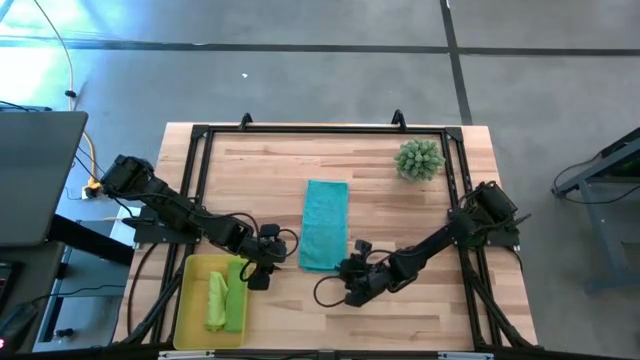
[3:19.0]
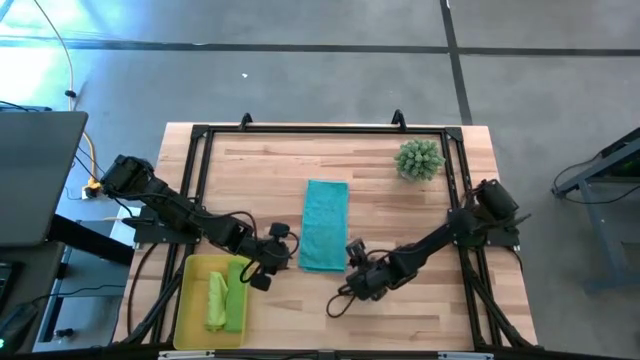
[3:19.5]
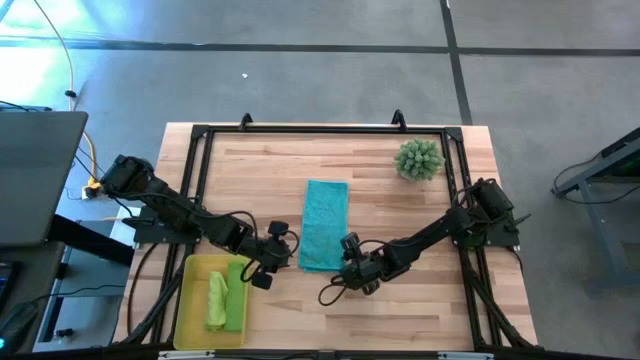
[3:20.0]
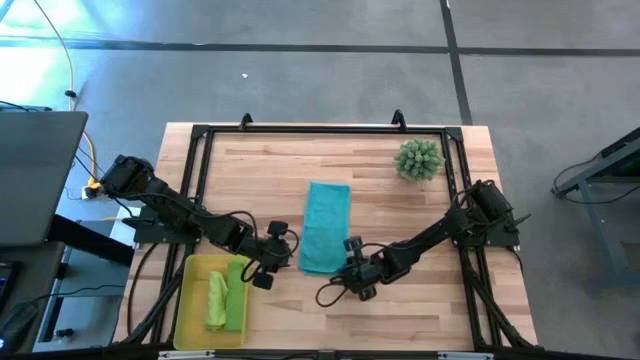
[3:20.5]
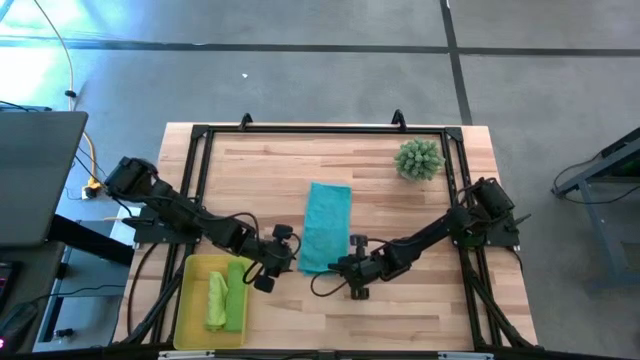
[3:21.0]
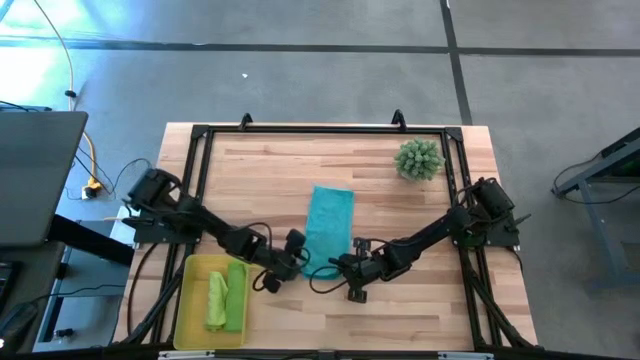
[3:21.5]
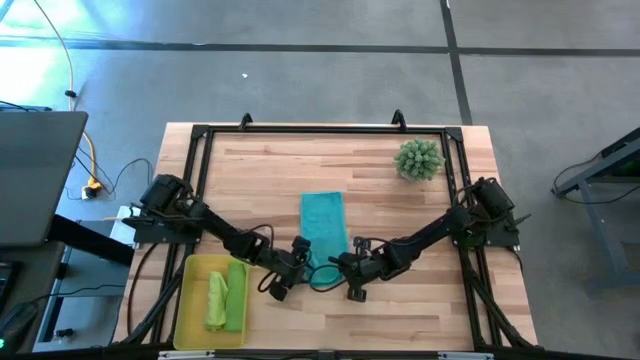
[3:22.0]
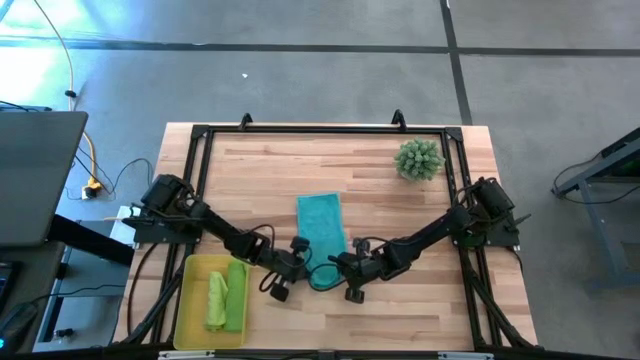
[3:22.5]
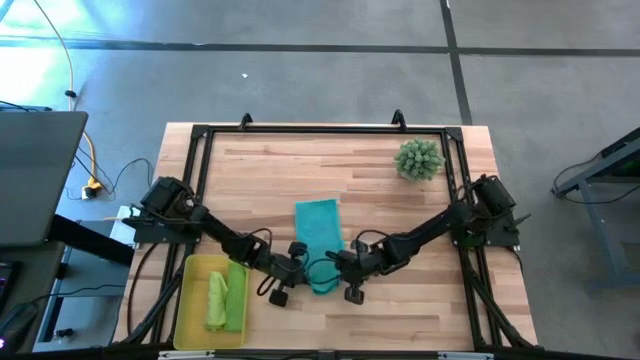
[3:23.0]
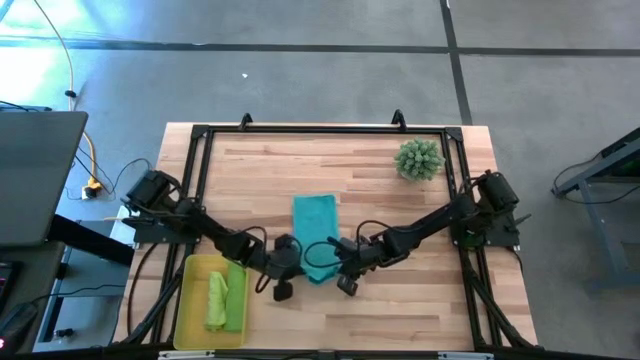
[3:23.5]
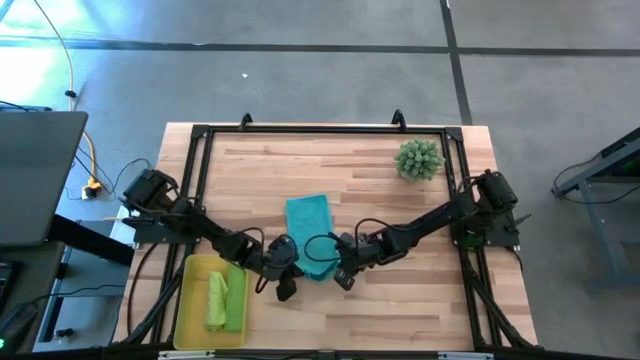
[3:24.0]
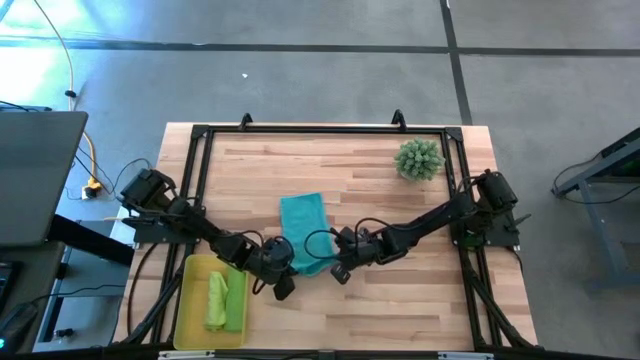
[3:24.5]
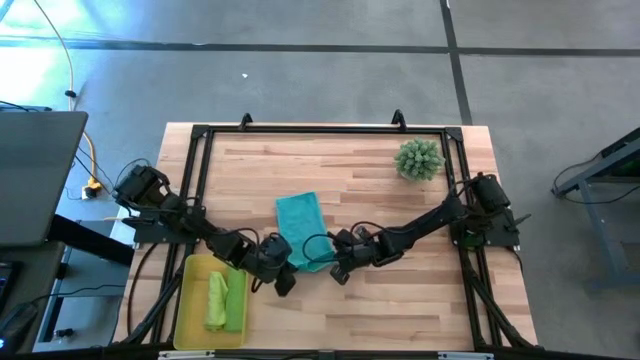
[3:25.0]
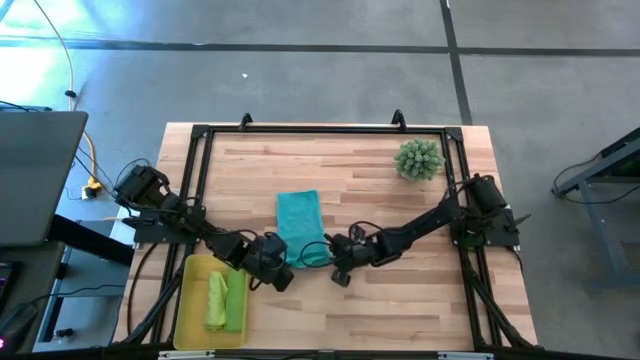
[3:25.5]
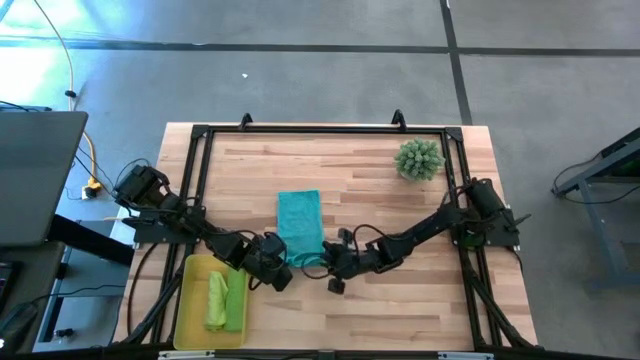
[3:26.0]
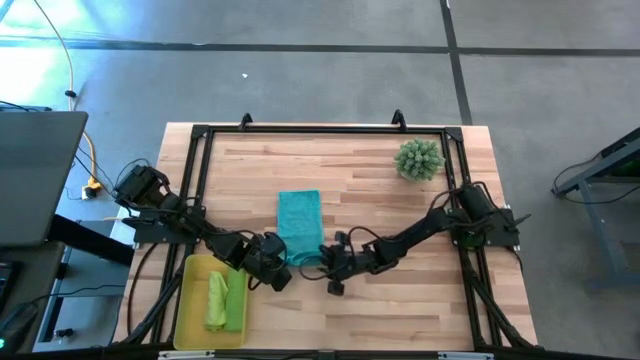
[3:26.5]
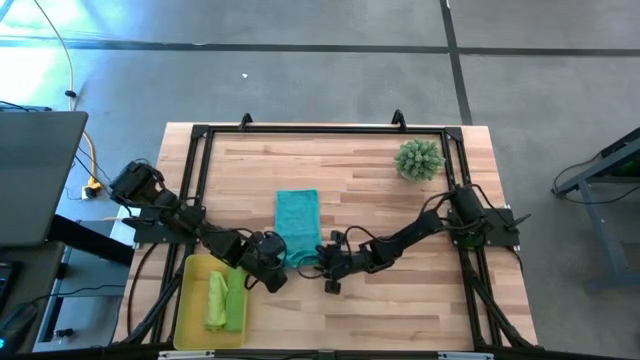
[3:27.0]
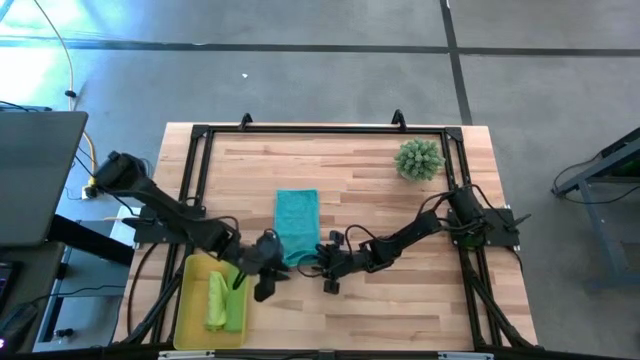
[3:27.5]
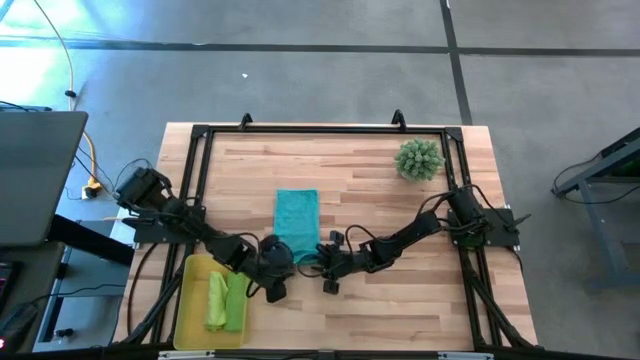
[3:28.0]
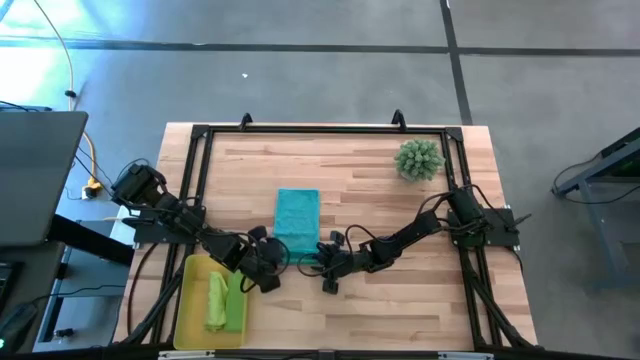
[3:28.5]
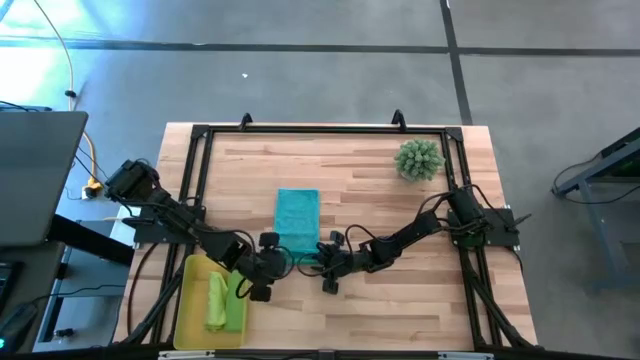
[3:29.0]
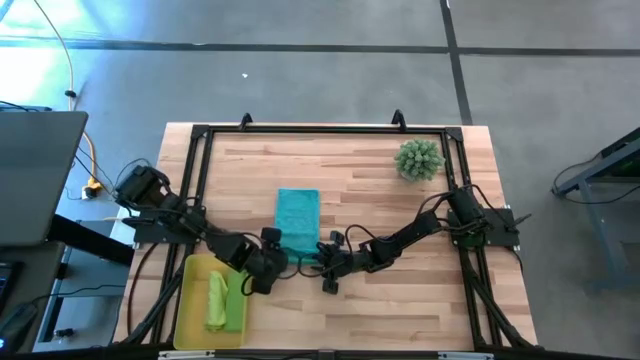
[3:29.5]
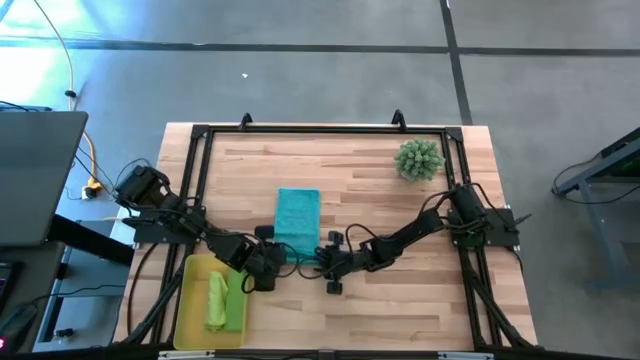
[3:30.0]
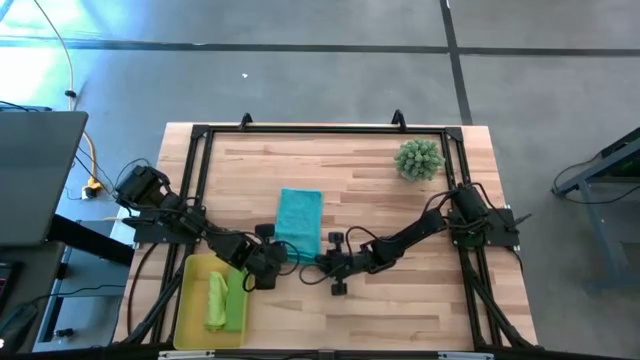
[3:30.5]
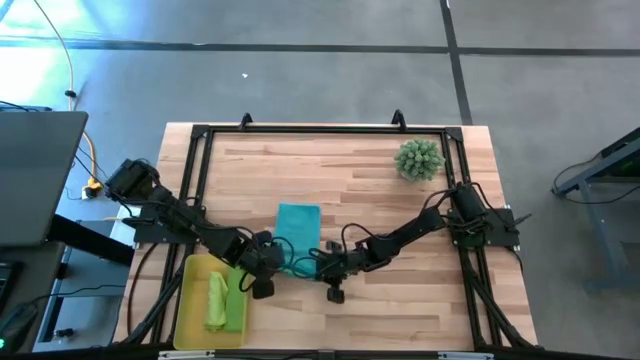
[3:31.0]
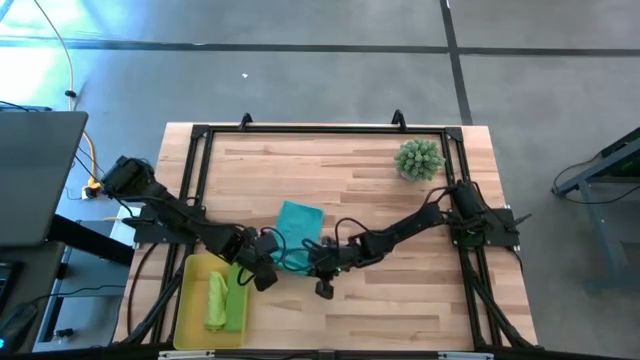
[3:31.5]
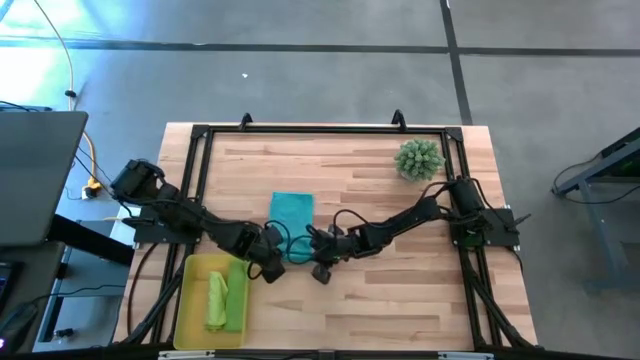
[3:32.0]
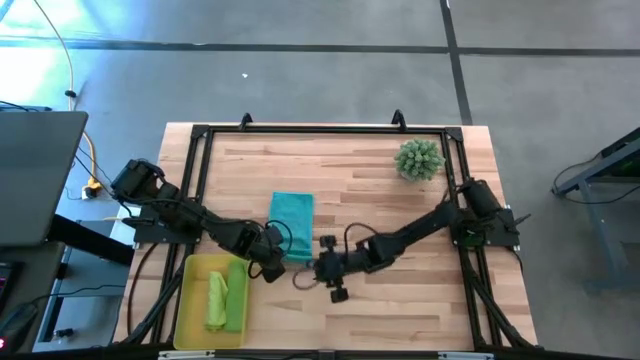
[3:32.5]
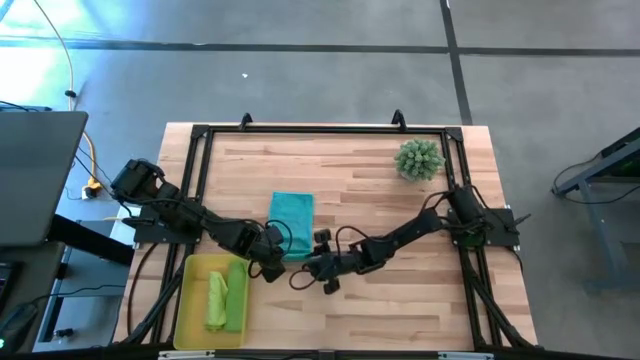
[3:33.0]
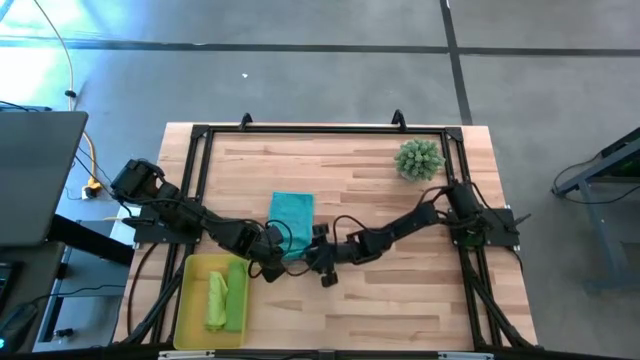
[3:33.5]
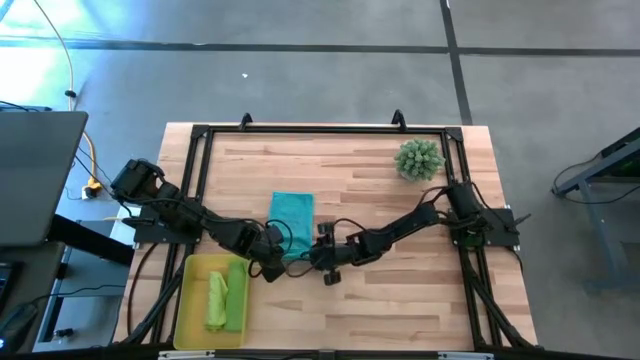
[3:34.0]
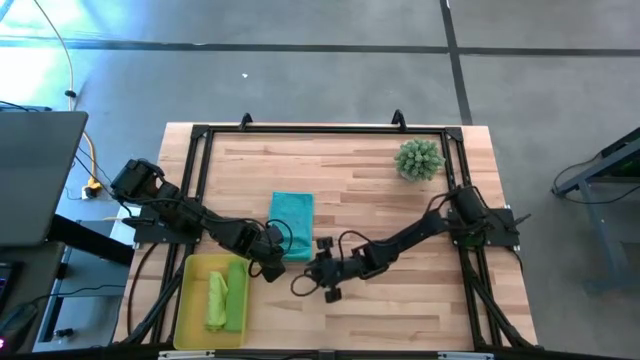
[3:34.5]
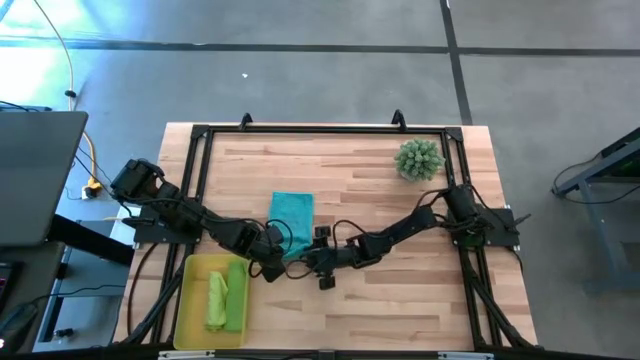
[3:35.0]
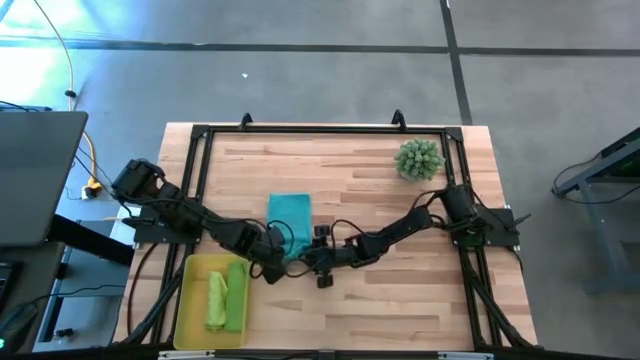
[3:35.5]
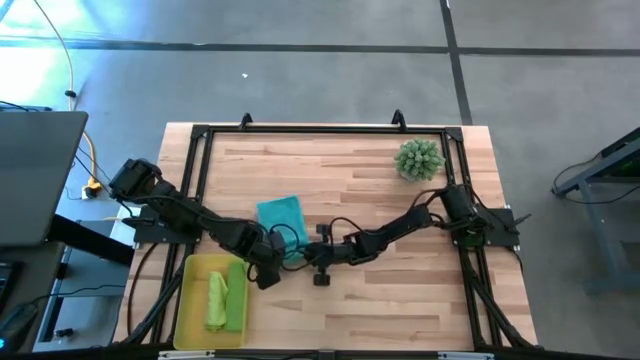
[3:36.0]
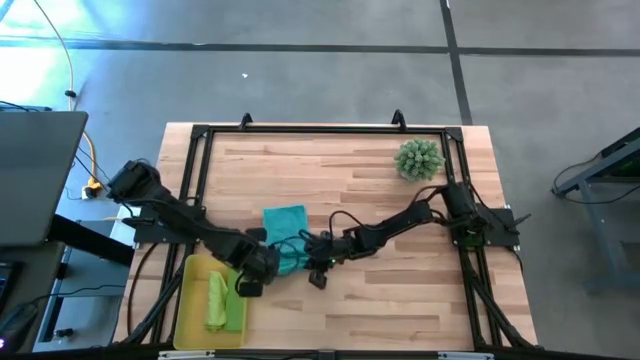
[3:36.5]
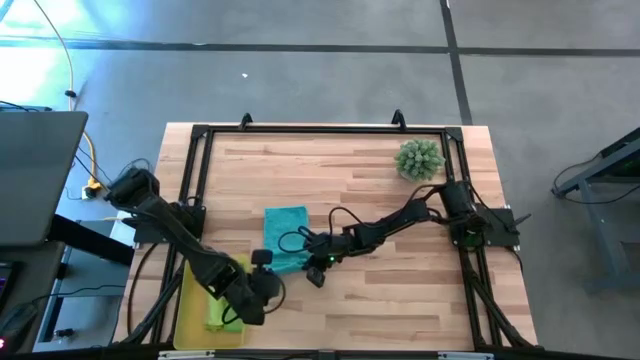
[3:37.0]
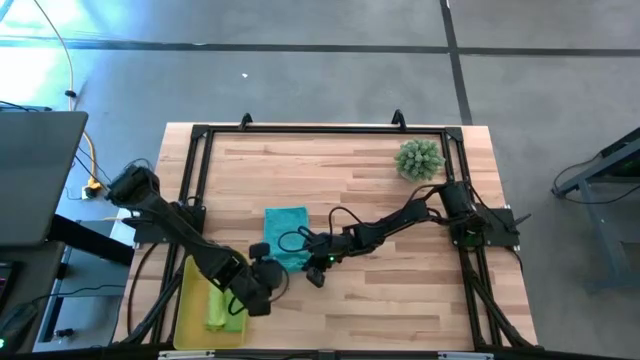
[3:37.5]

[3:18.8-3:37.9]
Task: Roll microfiber towels into tight, uniform cylinder then place into a basket
Roll the blue microfiber towel

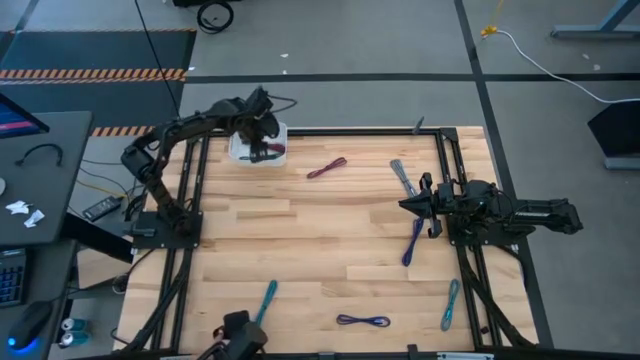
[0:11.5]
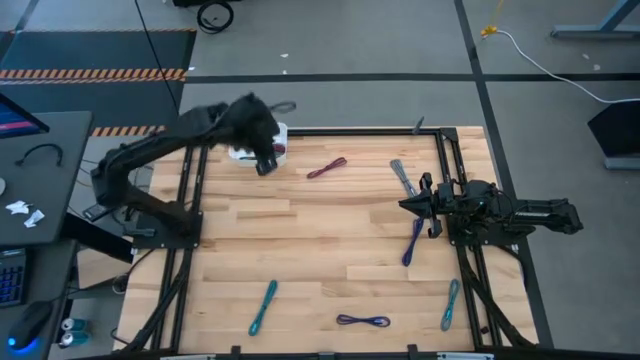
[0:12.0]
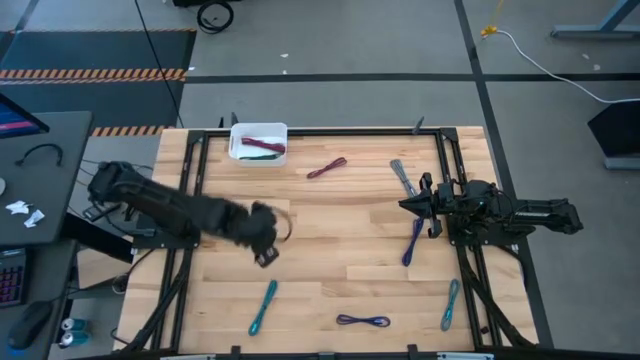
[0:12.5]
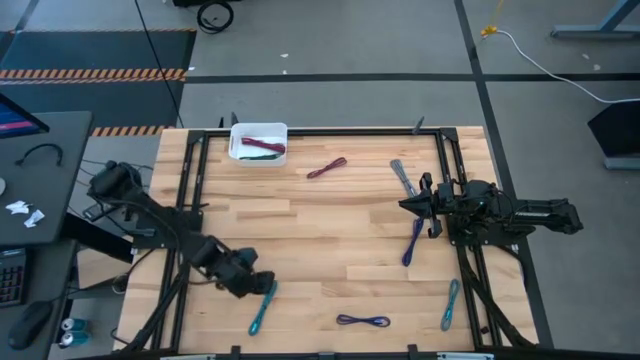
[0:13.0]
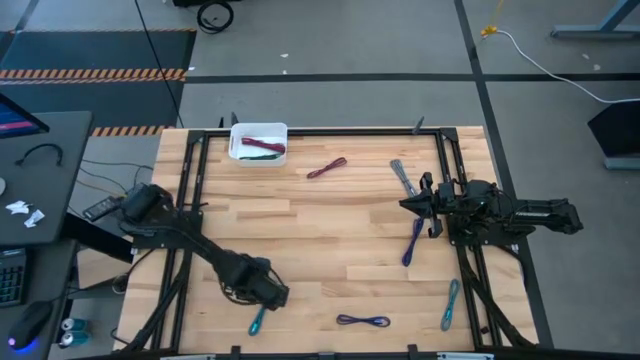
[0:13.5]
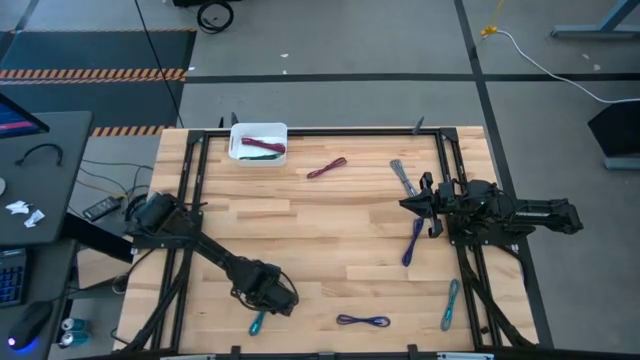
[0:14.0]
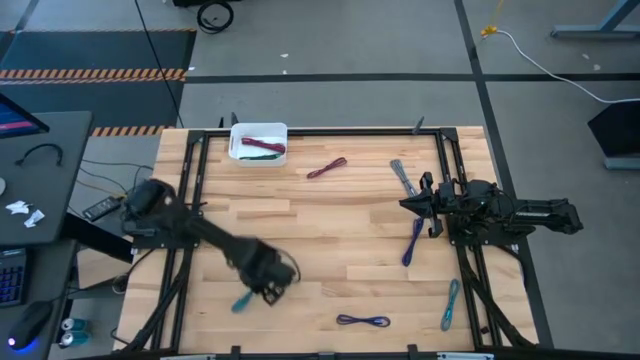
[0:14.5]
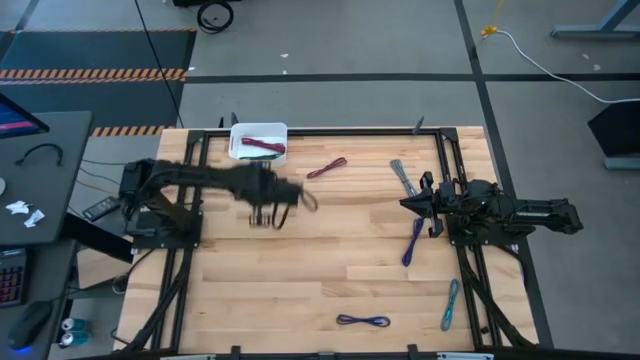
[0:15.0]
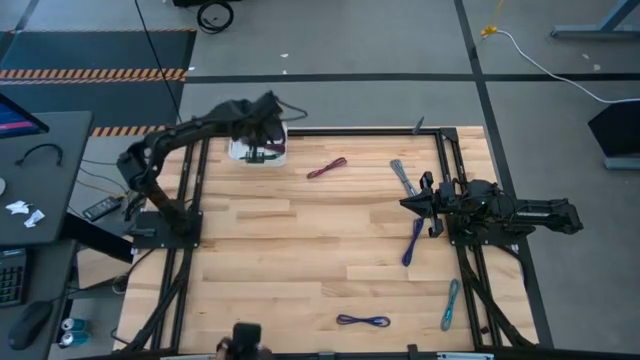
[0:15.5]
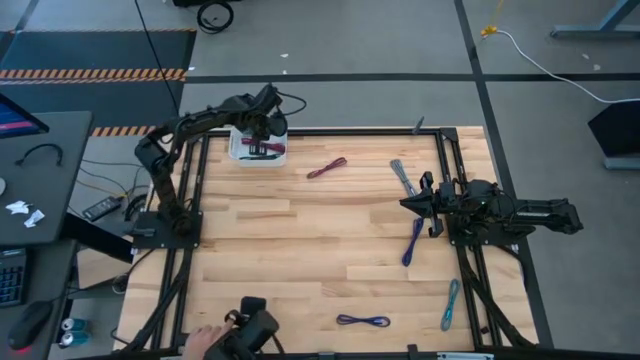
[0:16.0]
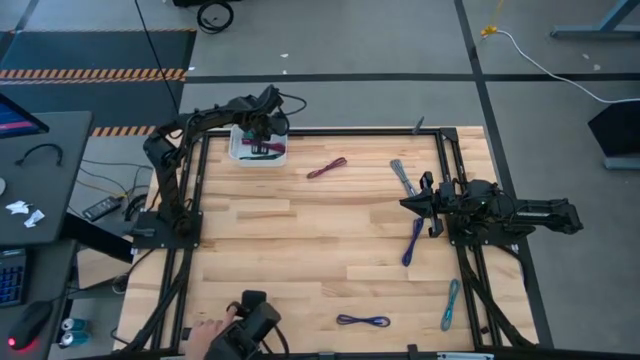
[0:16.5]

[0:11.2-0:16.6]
Task: Pick and place USB-C Cables
Put the left light blue USB cable into the white bin
